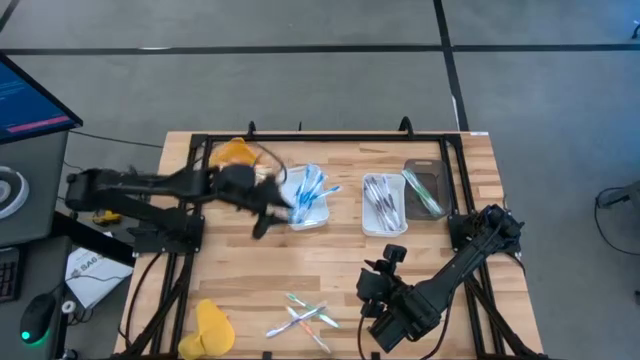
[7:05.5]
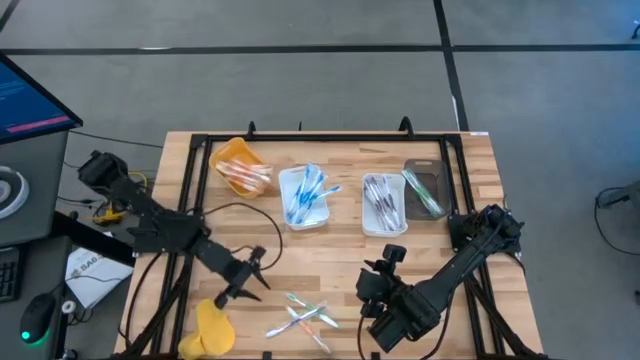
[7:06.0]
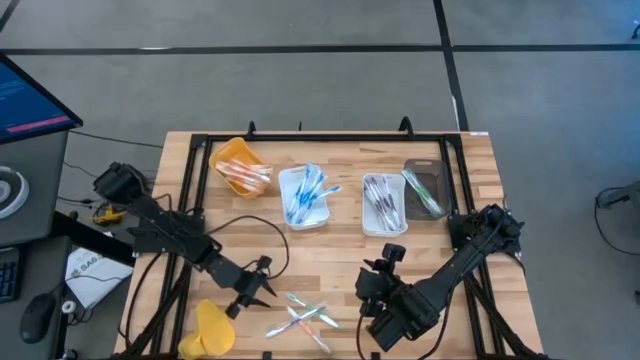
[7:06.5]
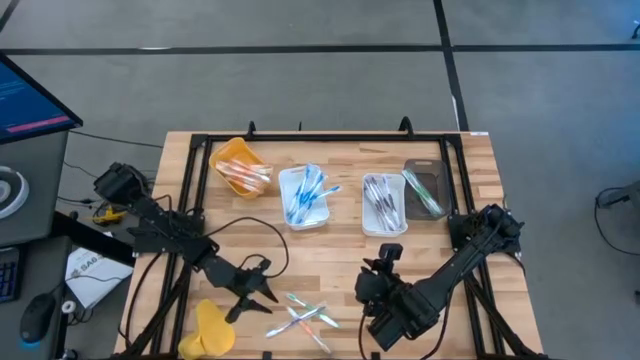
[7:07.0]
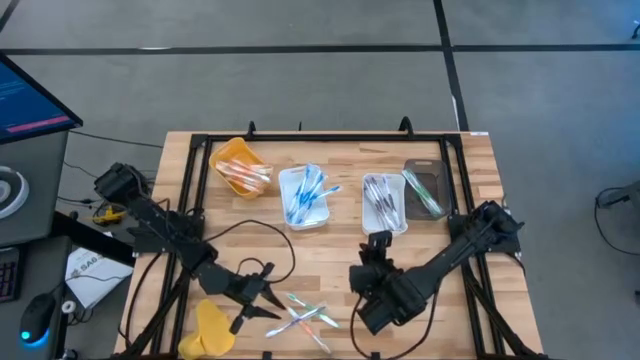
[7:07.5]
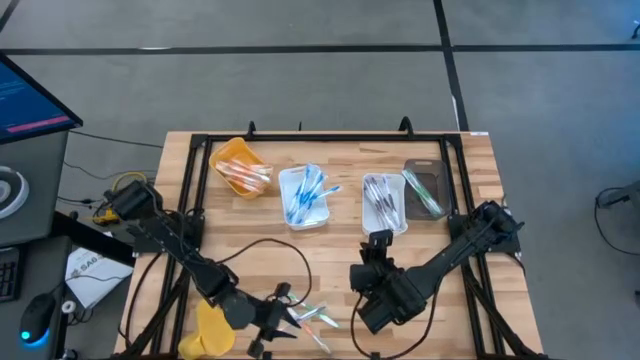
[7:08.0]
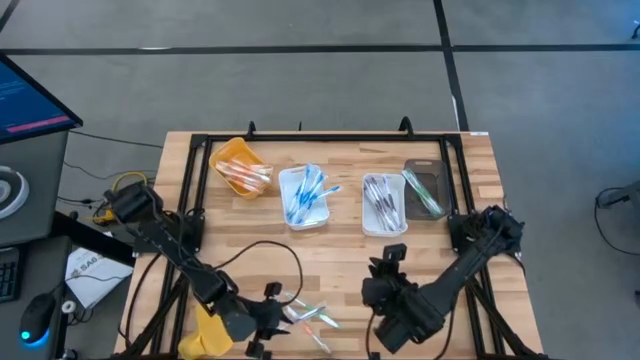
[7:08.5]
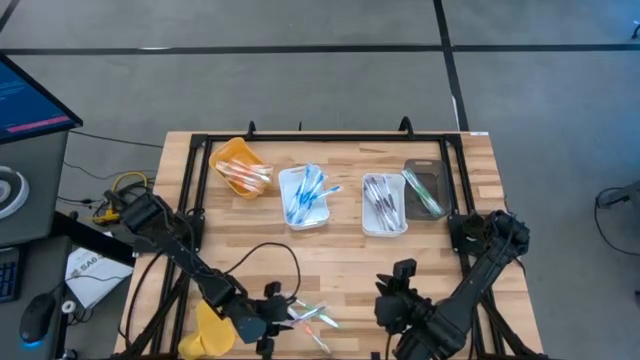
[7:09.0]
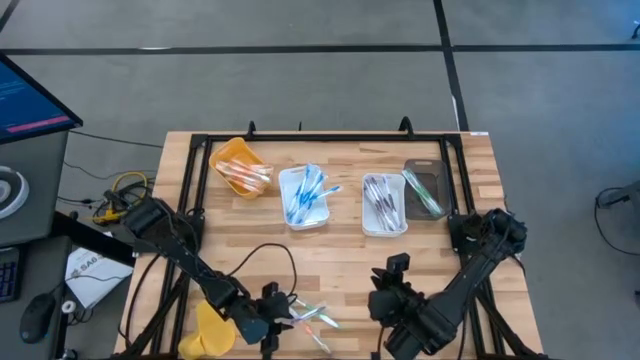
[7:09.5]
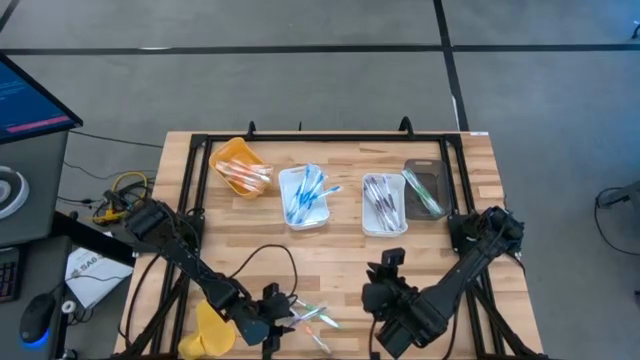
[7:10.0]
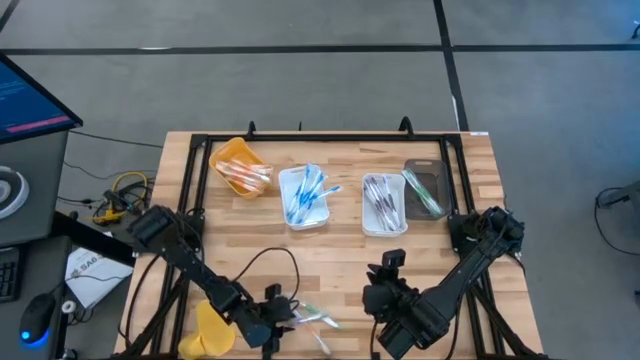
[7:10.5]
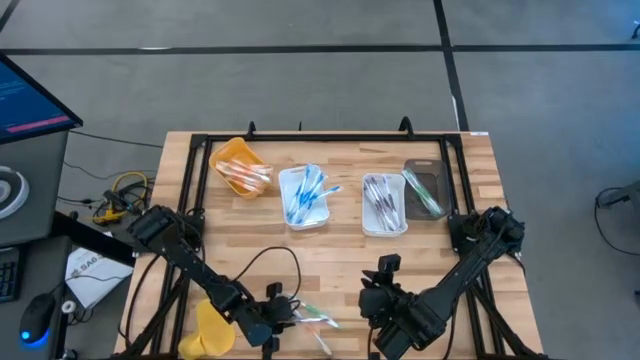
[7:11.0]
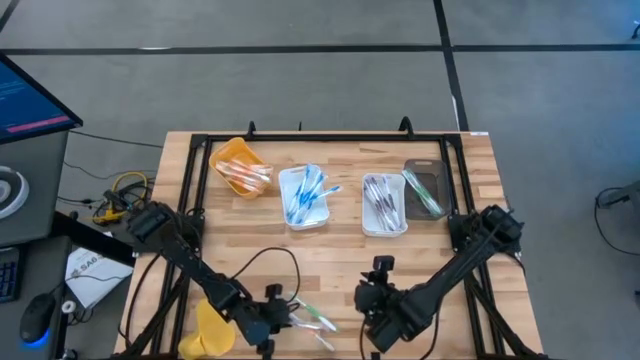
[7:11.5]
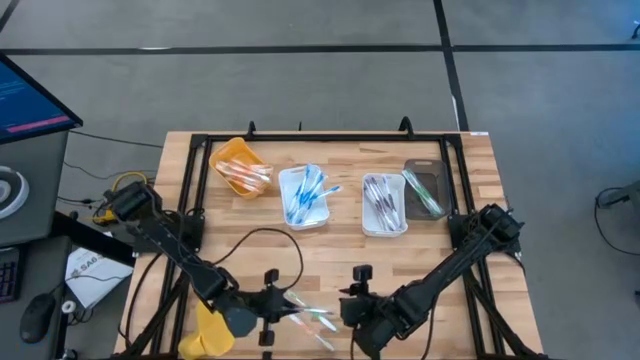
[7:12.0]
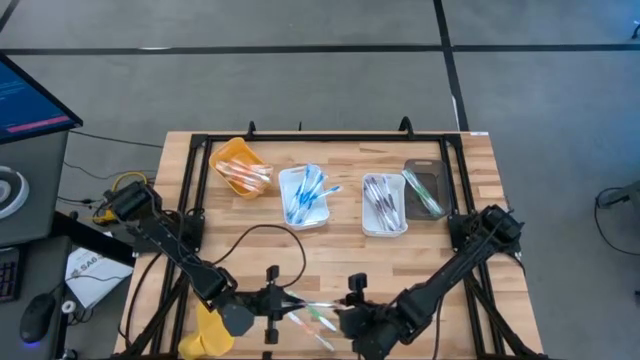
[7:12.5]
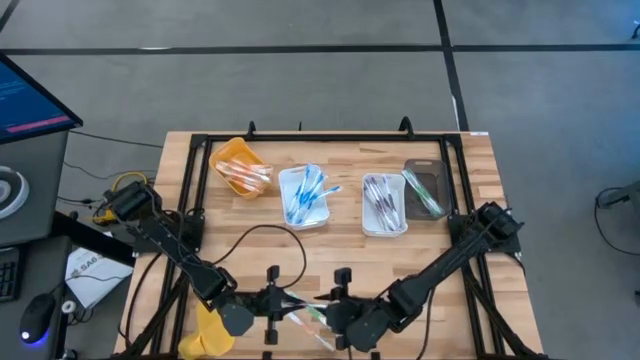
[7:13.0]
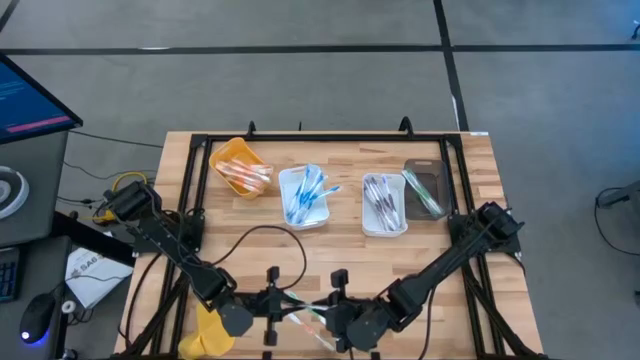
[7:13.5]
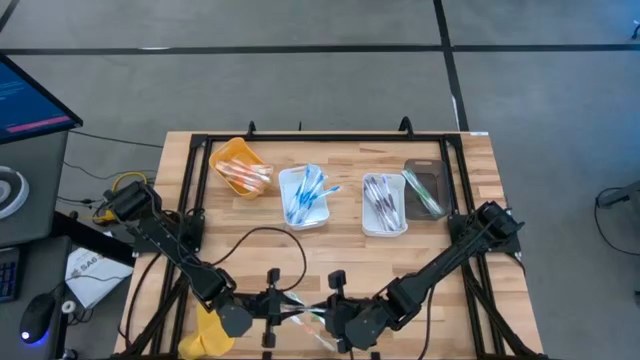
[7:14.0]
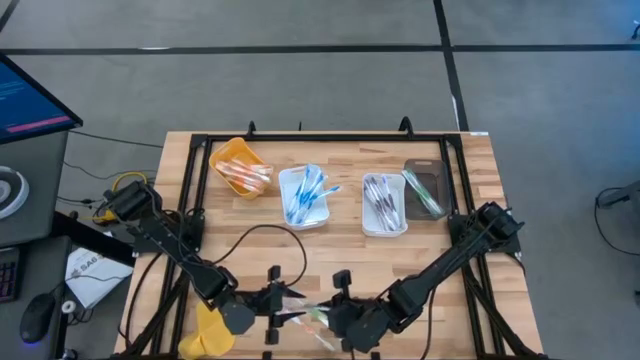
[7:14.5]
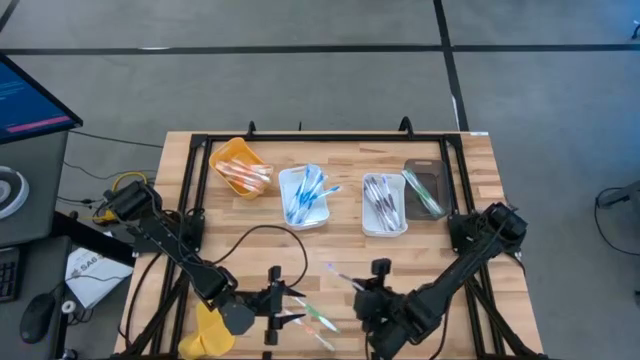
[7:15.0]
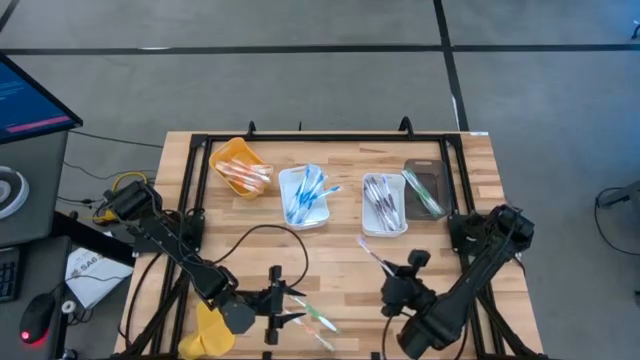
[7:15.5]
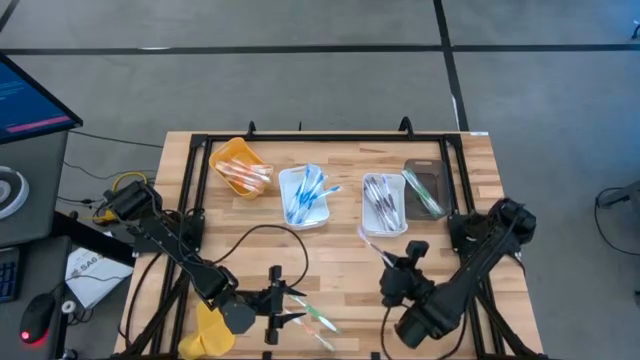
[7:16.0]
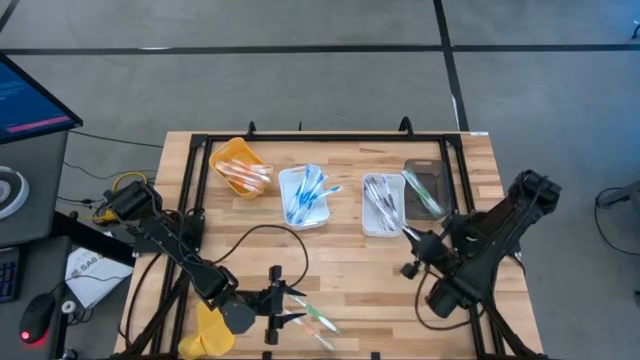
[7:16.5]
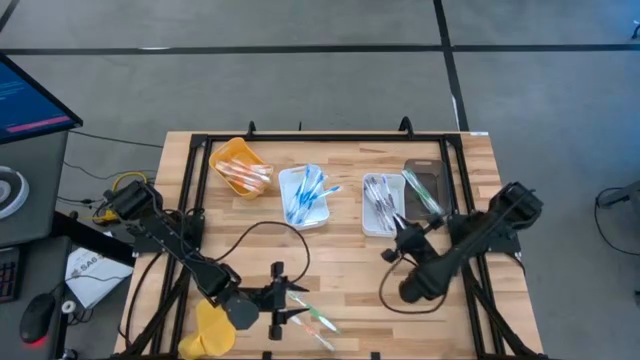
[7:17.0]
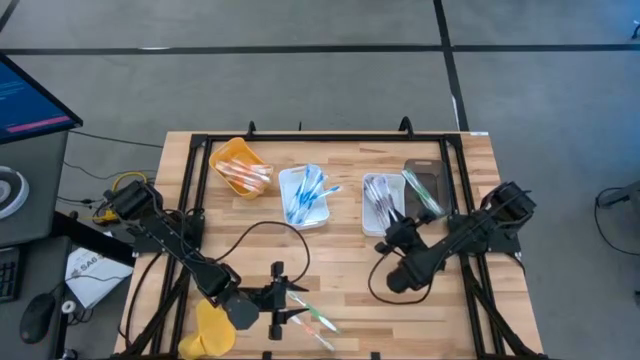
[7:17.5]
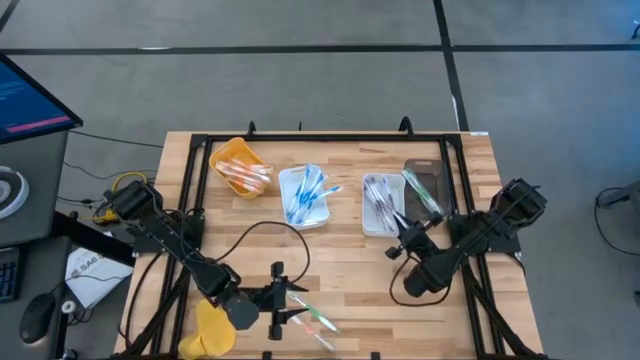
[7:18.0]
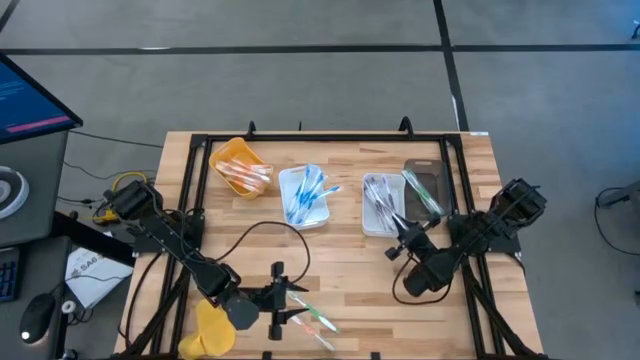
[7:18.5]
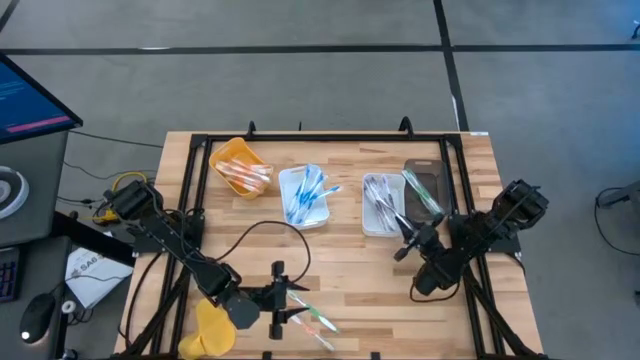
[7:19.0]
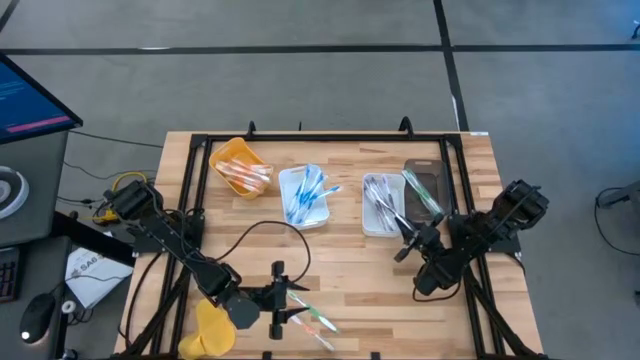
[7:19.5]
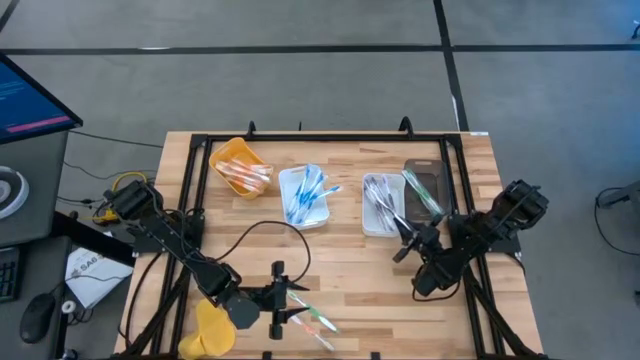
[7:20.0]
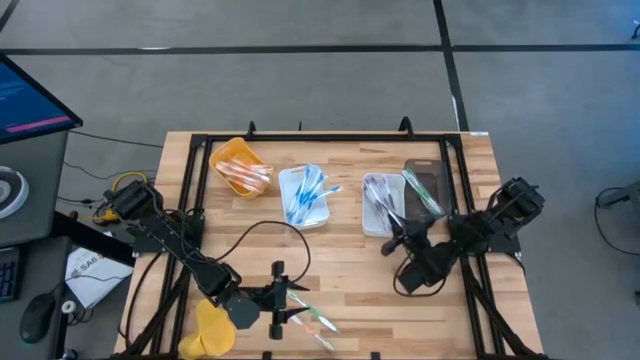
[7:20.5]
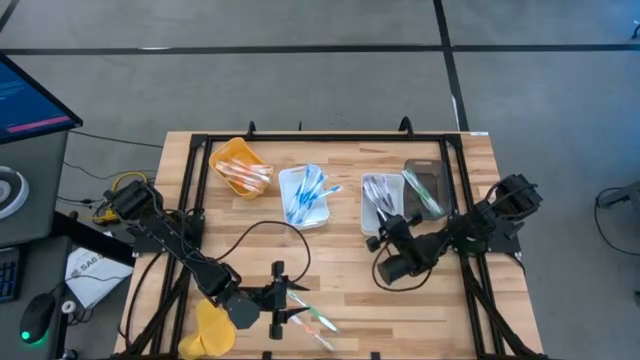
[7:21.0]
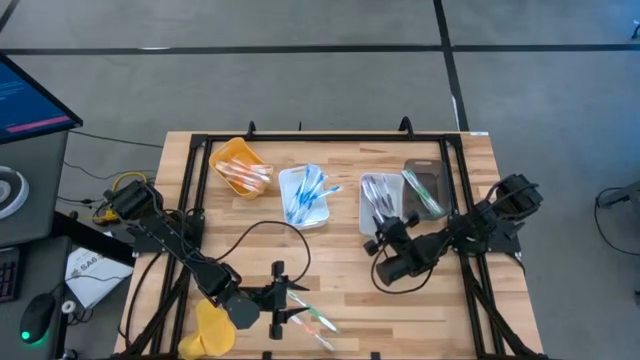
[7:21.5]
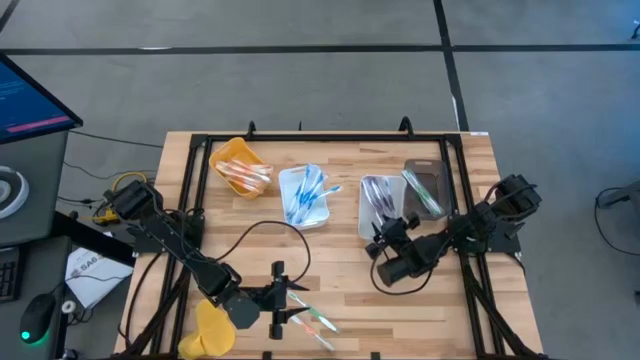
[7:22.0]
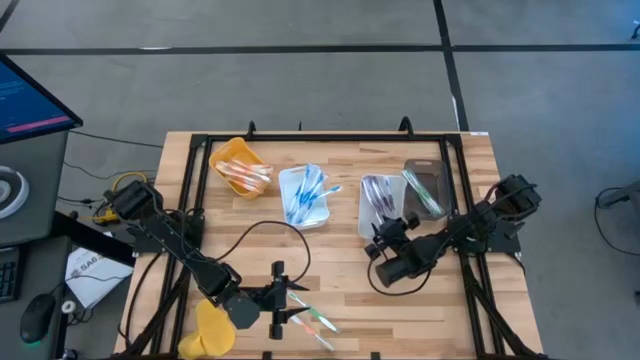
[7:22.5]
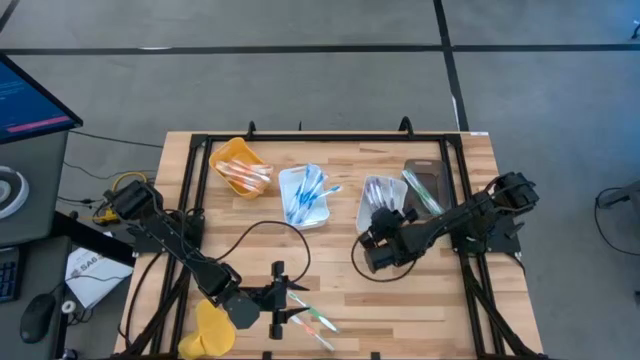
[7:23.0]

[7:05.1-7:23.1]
Task: Pick & Place Toothbrushes
Put the purple toothbrush into the right white bin

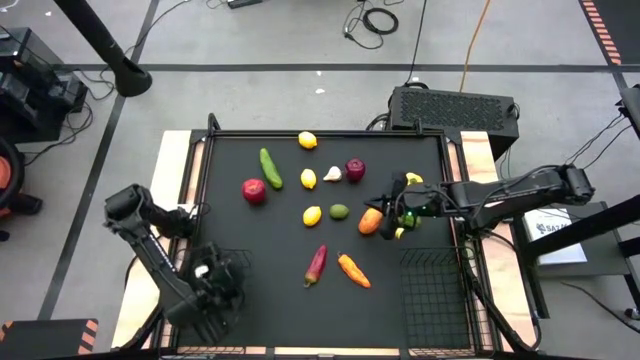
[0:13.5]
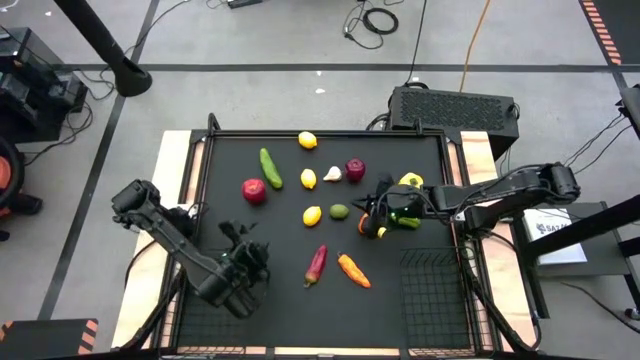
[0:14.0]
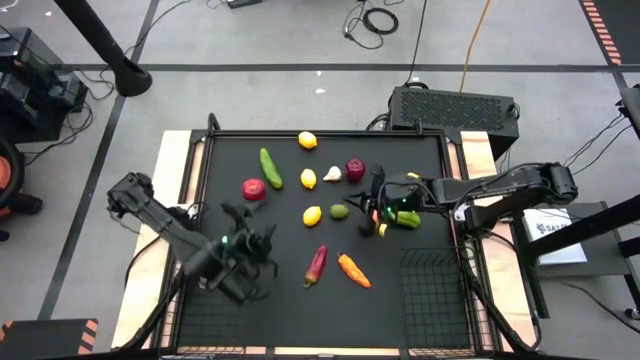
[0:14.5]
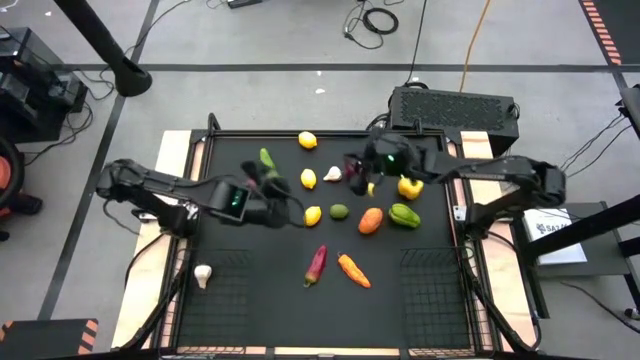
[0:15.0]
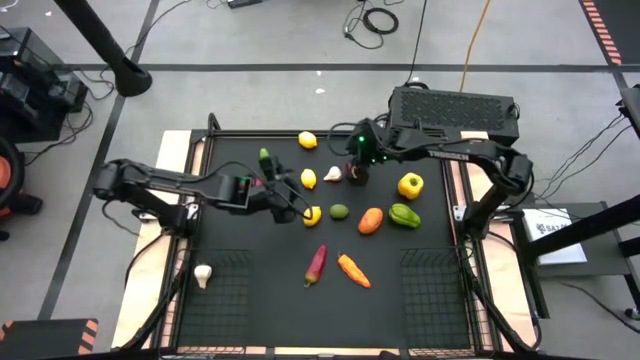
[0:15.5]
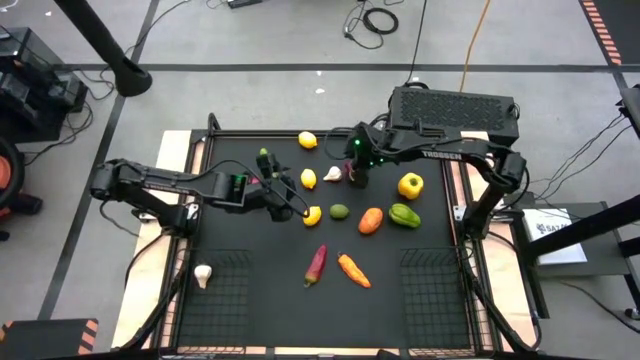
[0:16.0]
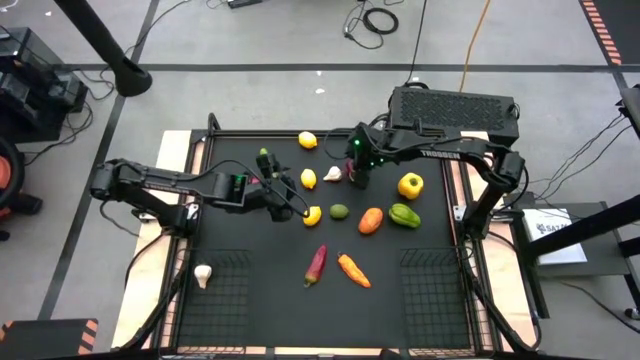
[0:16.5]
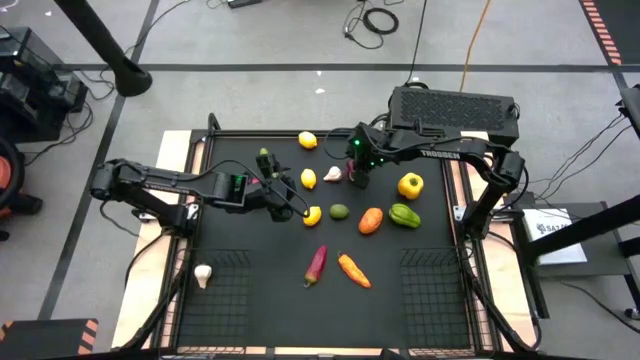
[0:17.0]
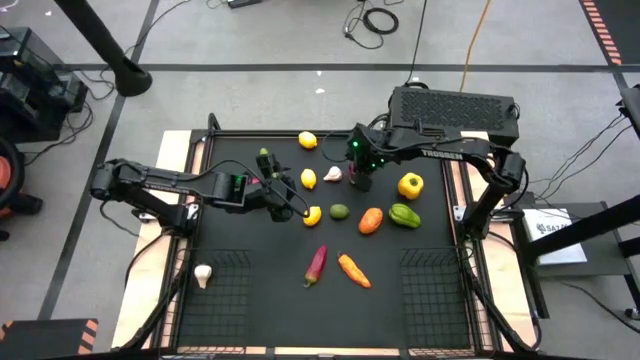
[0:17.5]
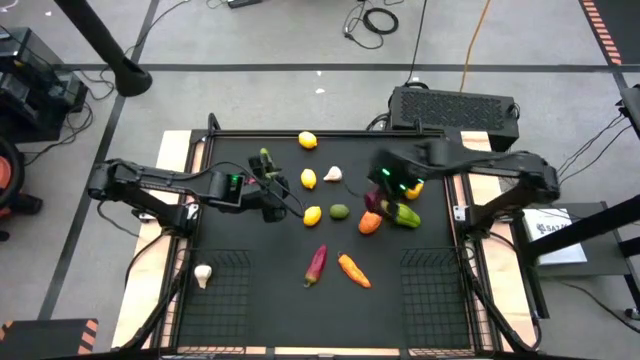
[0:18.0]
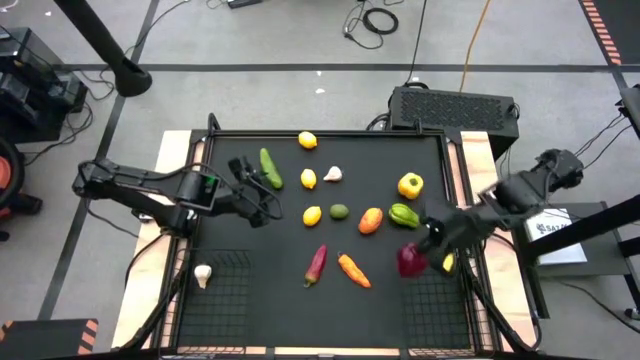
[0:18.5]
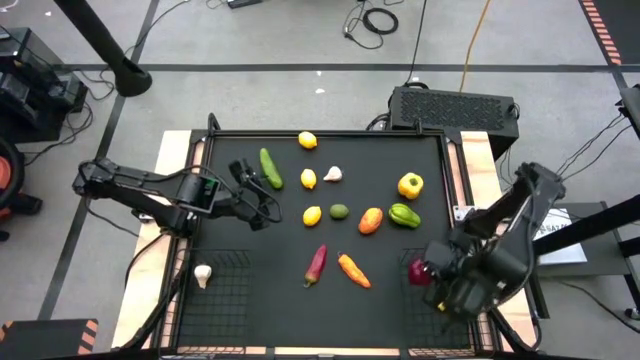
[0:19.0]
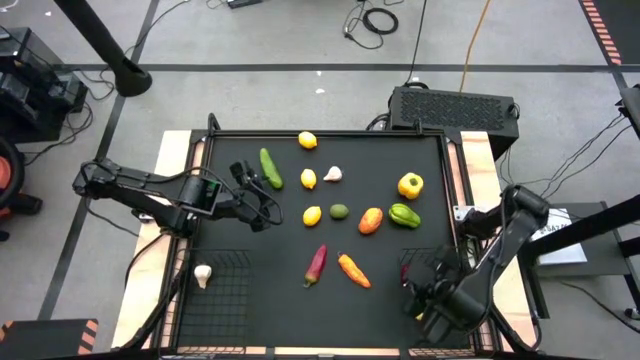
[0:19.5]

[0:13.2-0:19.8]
Task: Sort produce into baskets
Put the right apple into the bottom right basket
